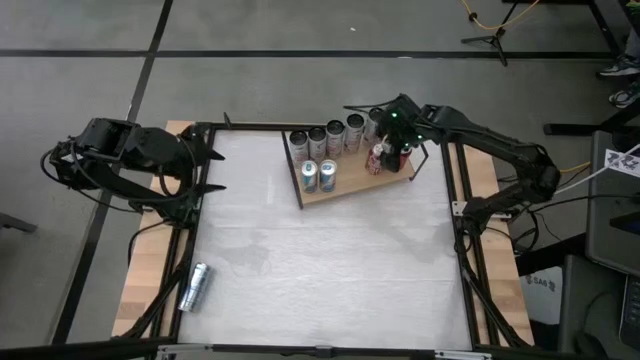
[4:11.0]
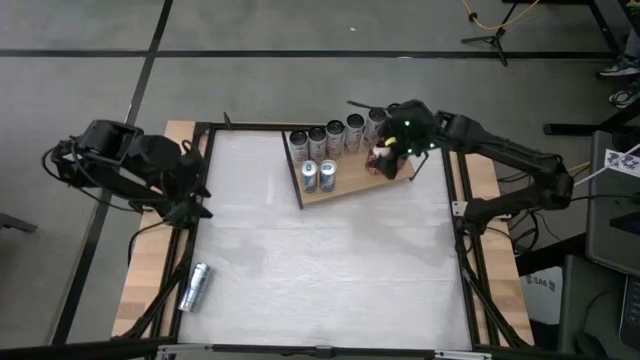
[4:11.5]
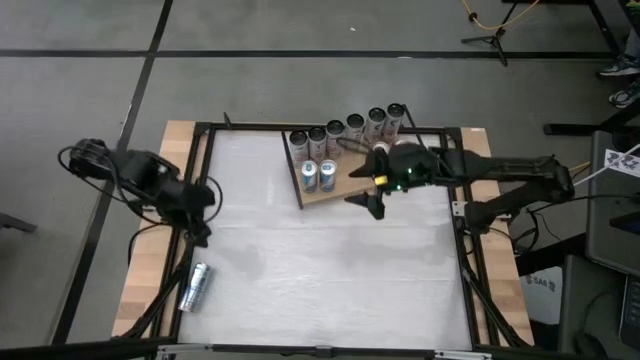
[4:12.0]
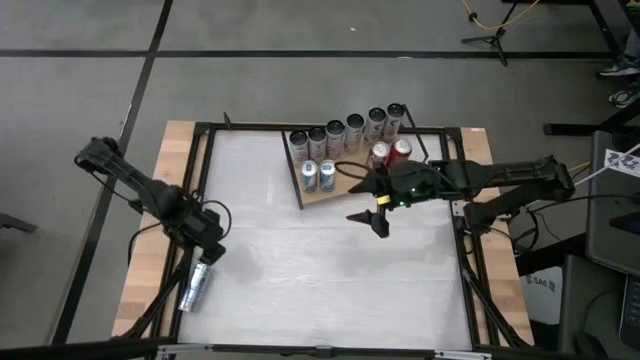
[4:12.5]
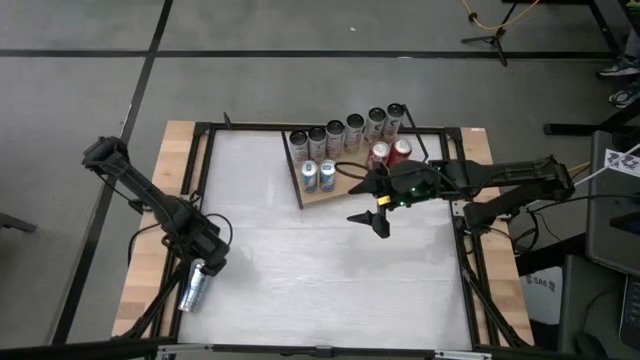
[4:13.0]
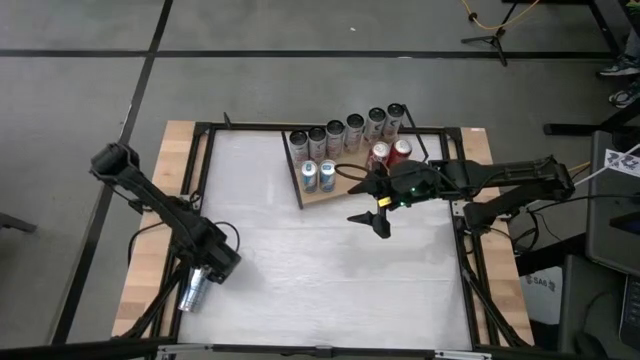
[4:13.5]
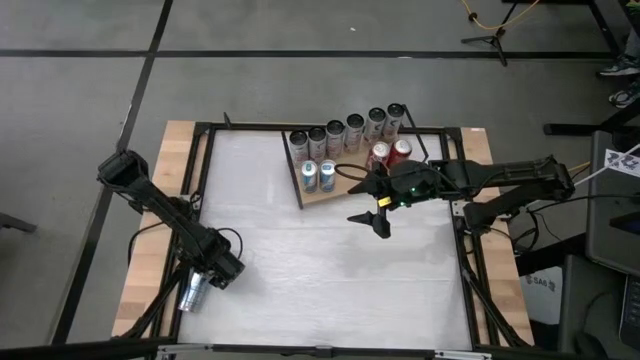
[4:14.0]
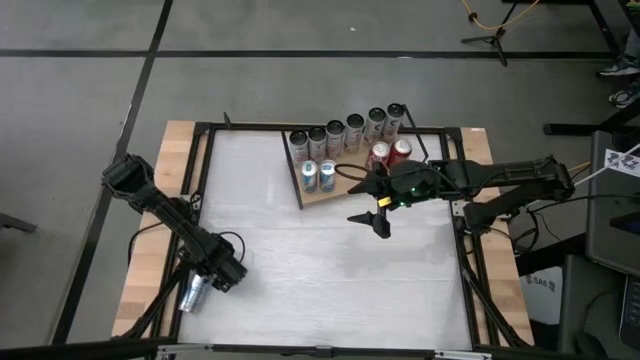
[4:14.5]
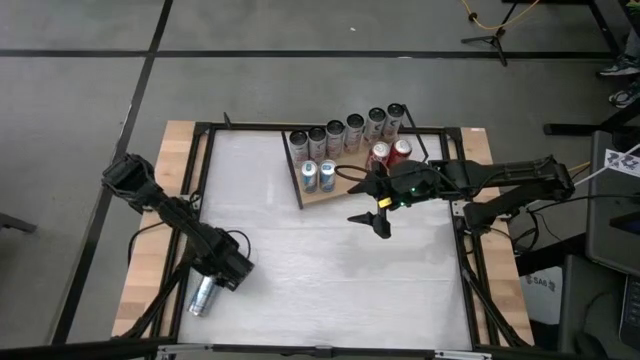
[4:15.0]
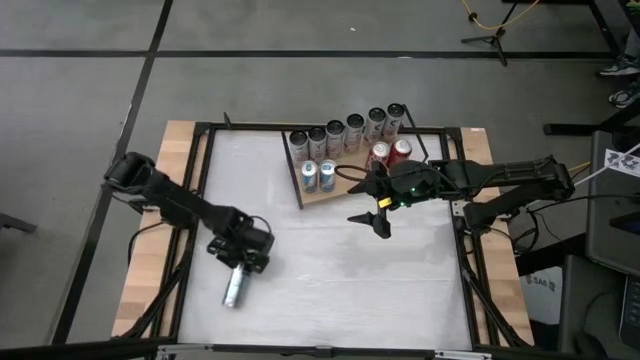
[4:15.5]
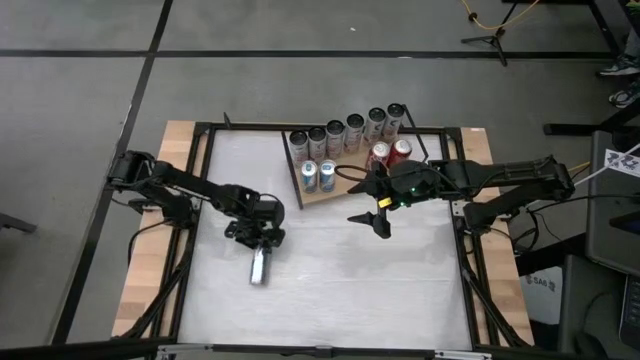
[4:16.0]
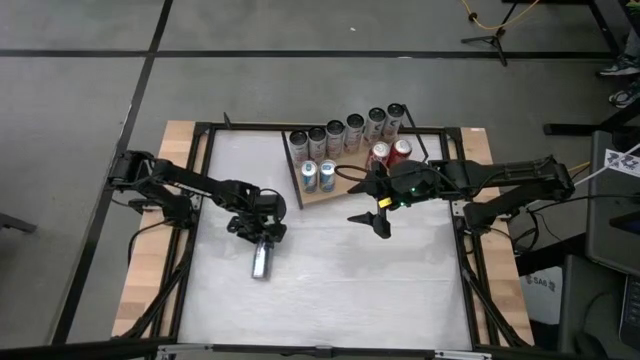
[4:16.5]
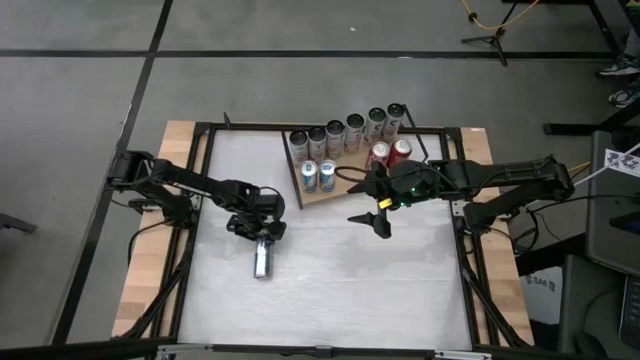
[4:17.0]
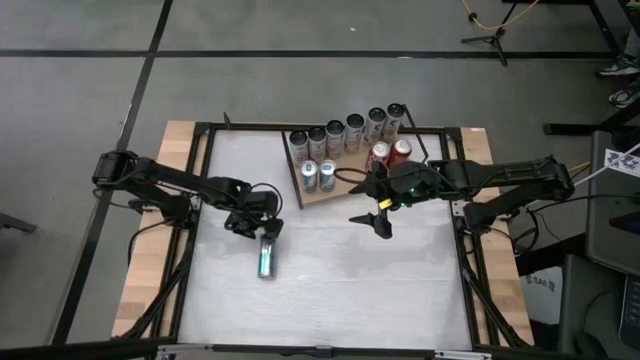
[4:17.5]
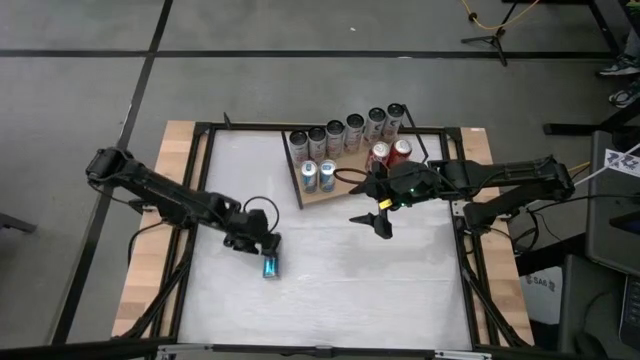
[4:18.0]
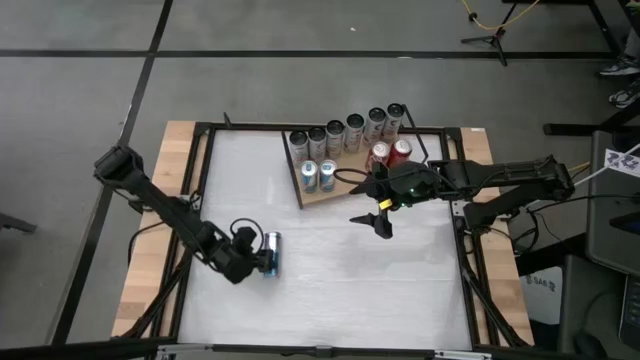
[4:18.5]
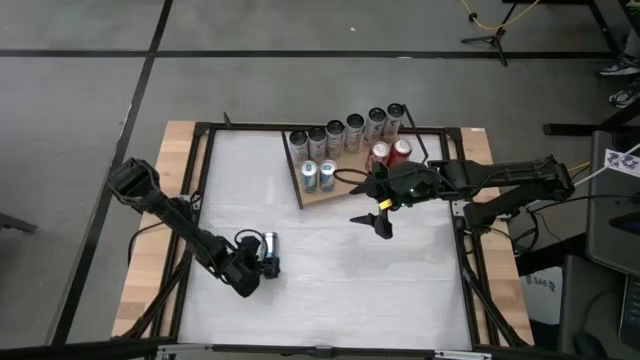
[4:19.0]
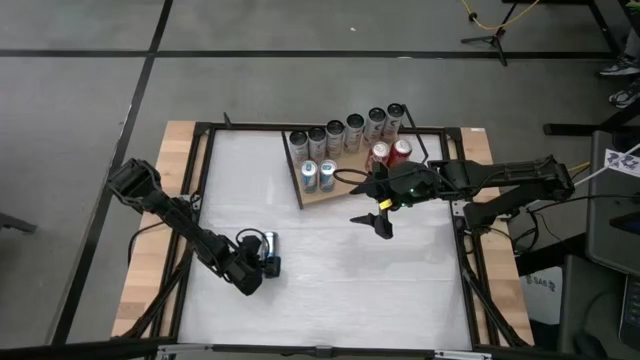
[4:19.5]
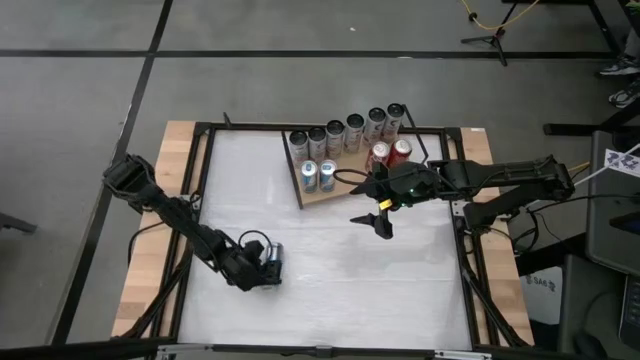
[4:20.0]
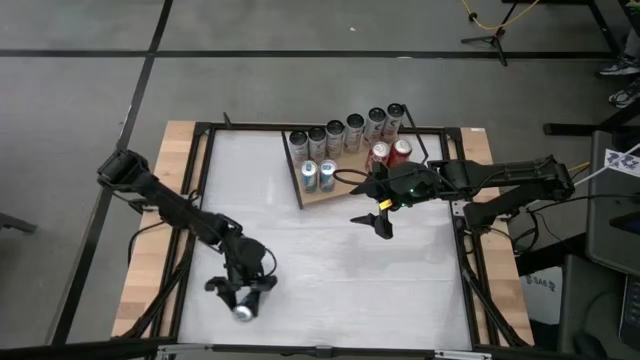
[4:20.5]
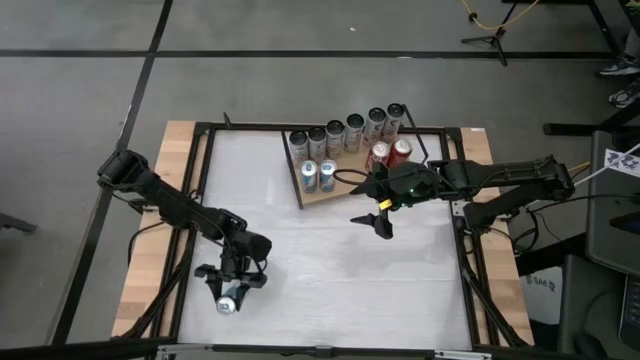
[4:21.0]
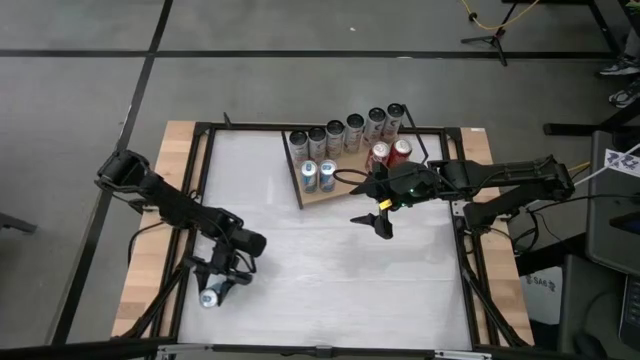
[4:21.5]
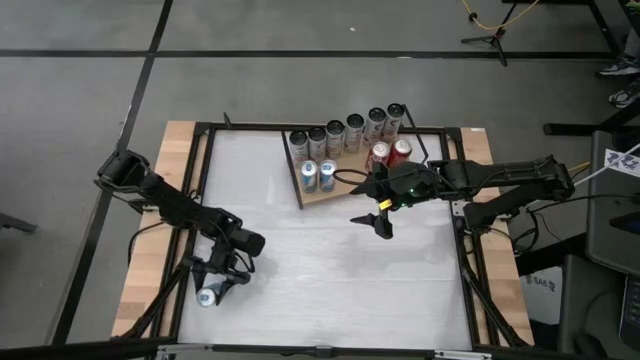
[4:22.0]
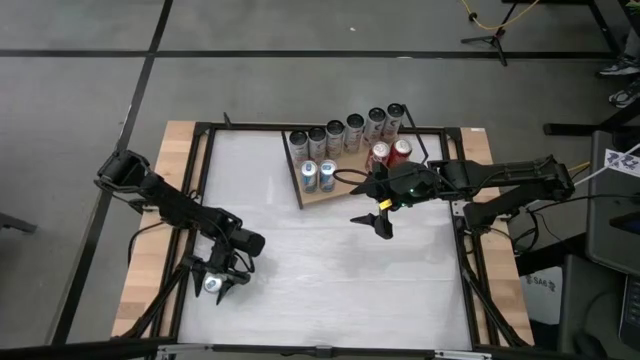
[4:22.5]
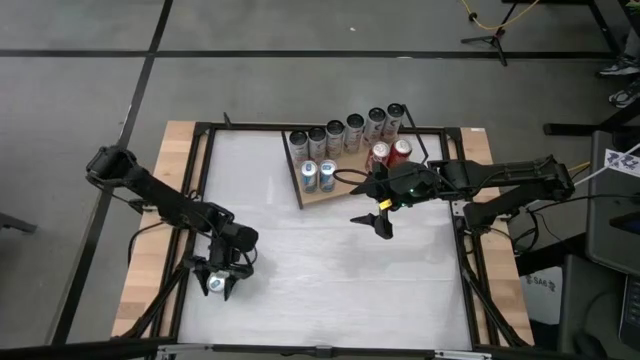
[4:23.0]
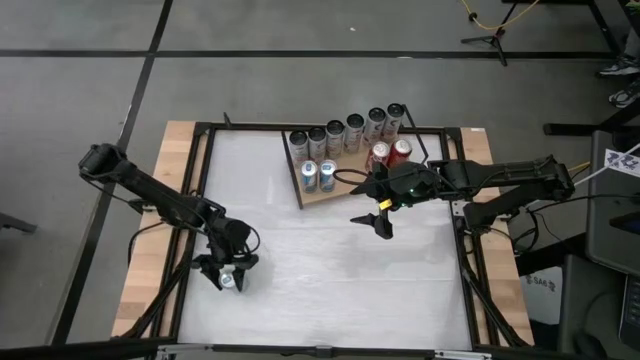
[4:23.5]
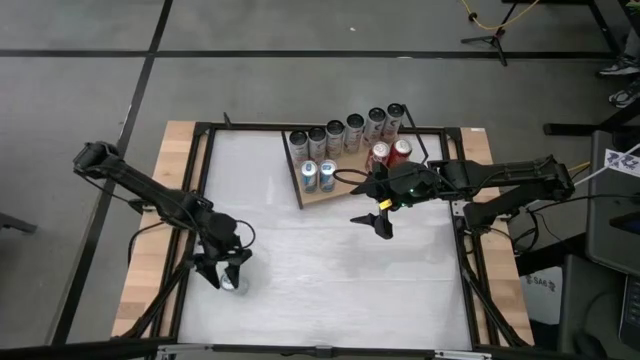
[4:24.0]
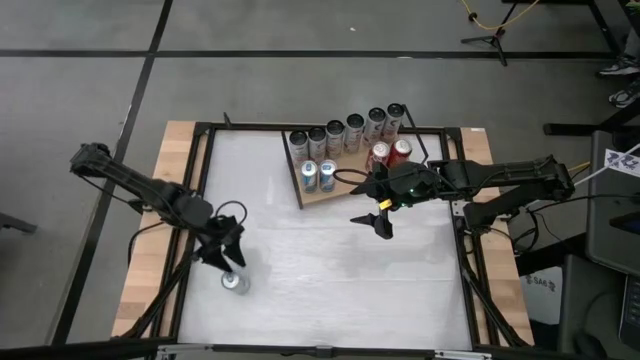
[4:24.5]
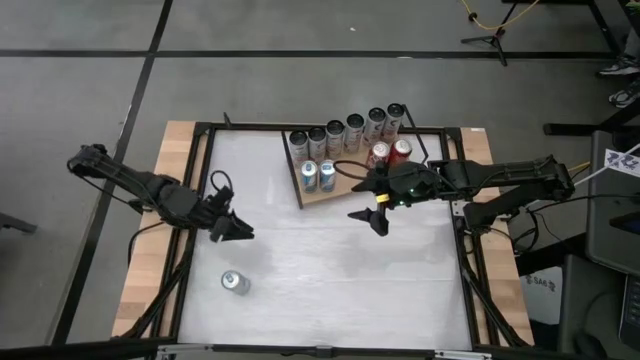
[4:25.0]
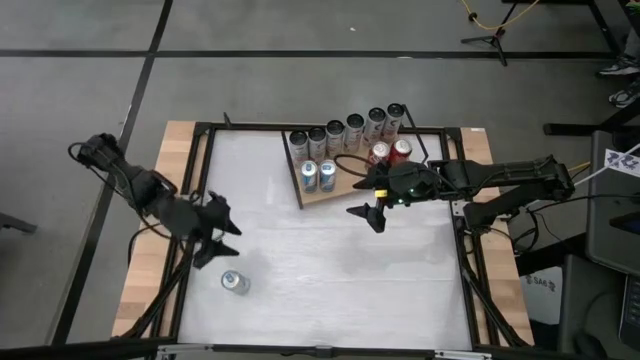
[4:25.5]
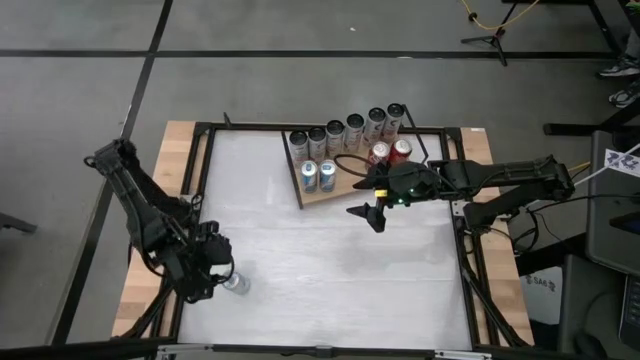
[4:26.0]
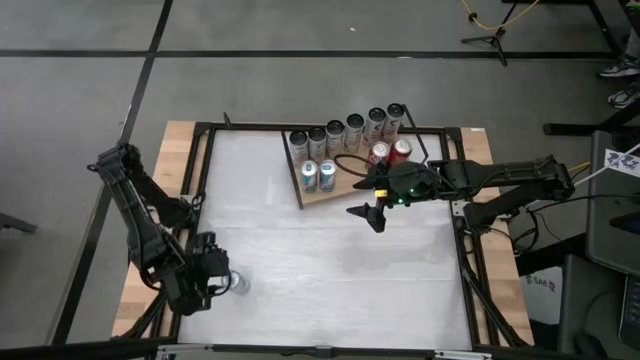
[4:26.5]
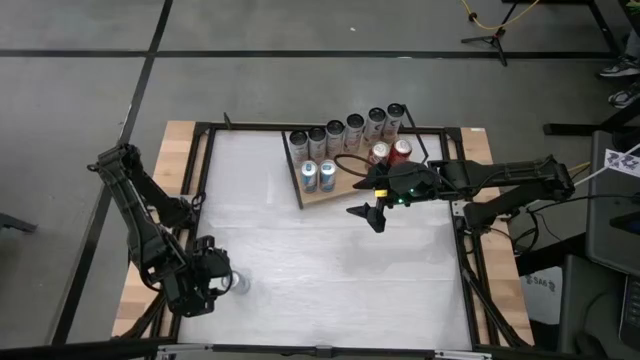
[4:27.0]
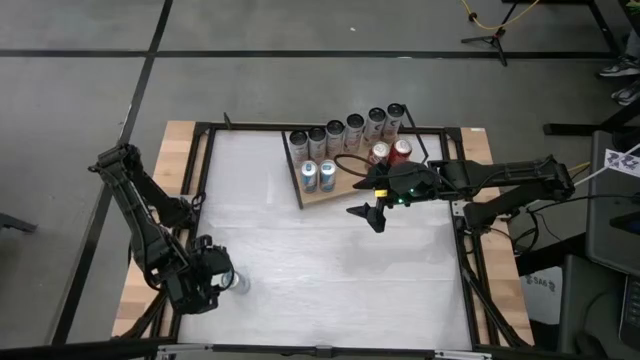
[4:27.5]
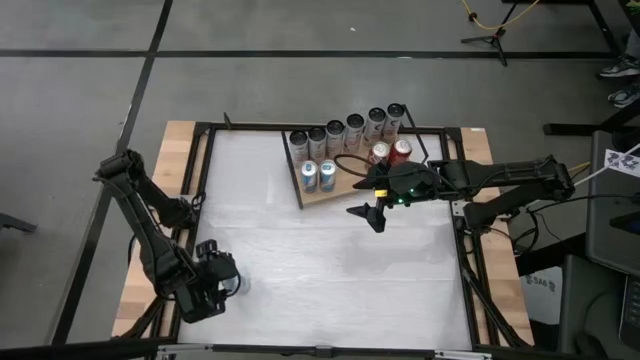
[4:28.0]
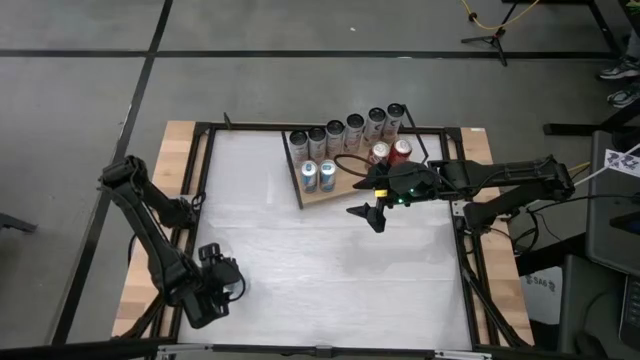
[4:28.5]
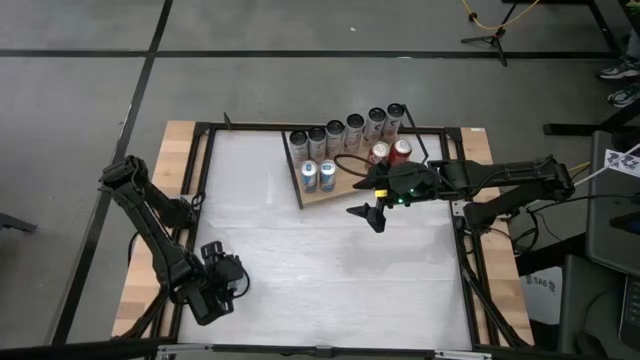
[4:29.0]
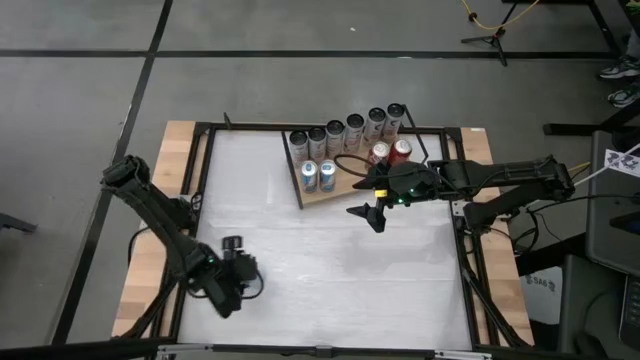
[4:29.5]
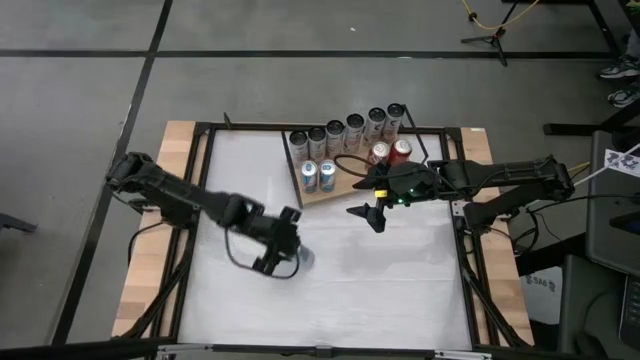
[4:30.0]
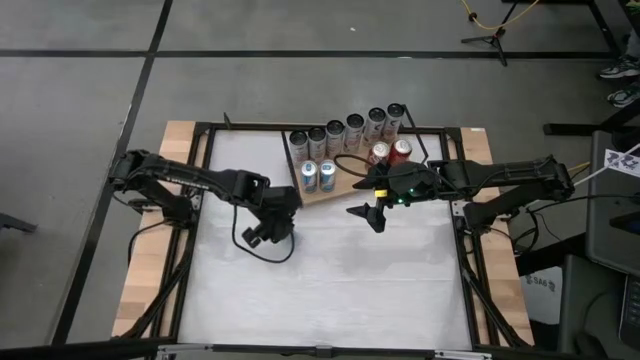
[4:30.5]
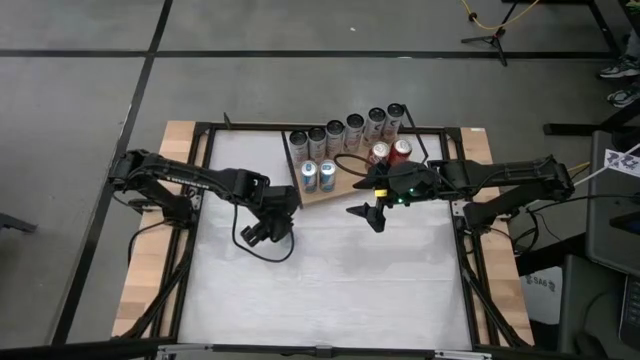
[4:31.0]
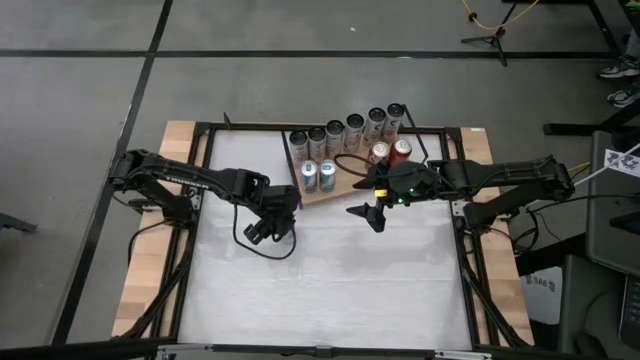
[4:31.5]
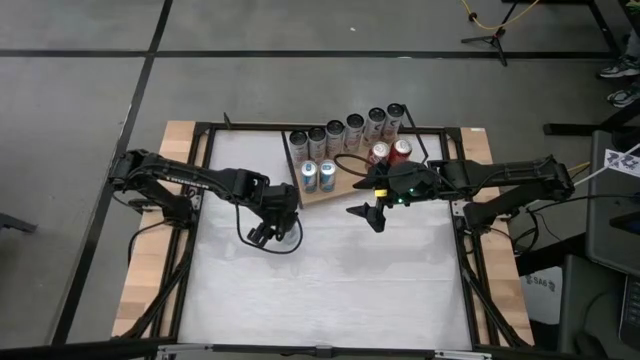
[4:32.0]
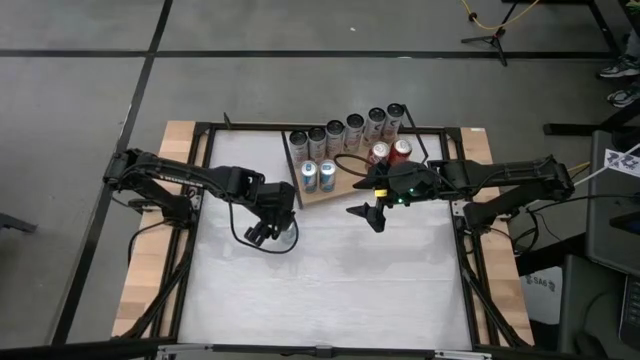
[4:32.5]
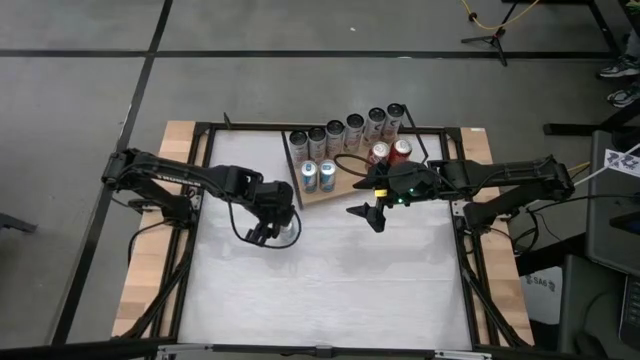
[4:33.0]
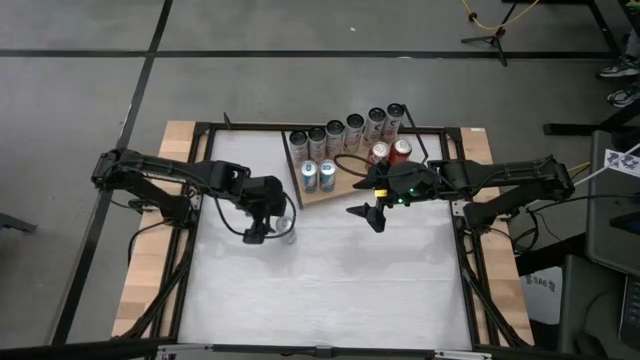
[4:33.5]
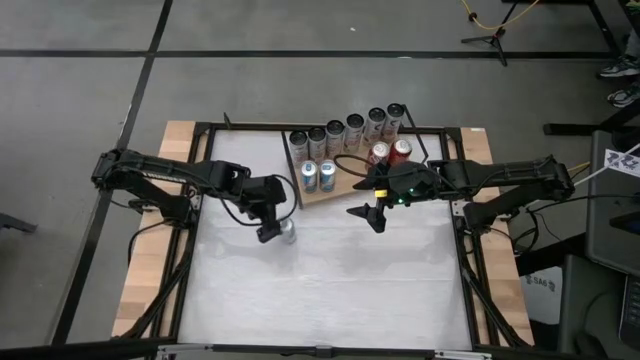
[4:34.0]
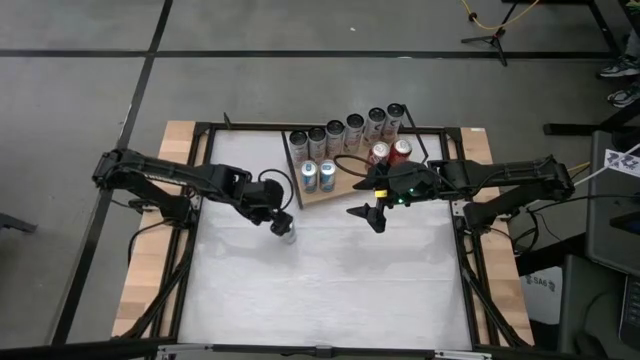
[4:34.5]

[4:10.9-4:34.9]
Task: Place canned beverage on shelf
Put the blue soda can on the shelf aligned with the other blue soda cans
